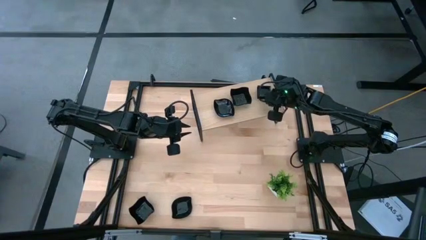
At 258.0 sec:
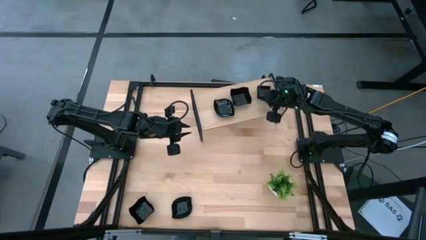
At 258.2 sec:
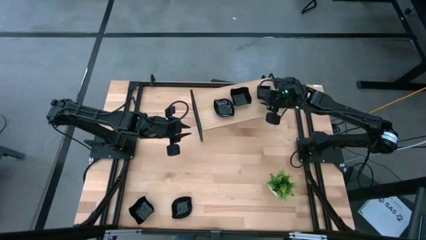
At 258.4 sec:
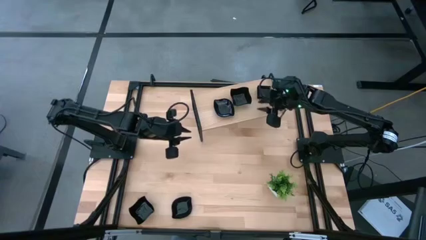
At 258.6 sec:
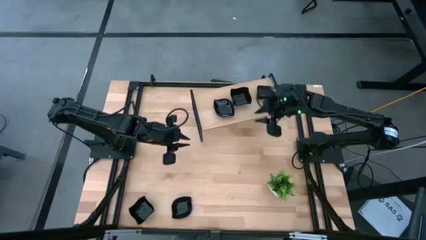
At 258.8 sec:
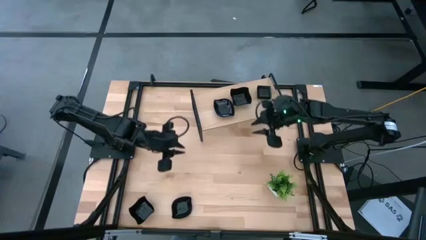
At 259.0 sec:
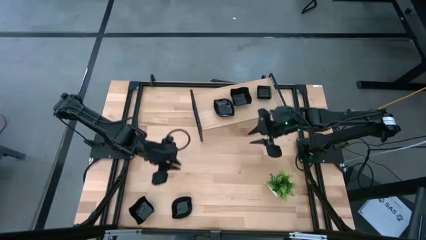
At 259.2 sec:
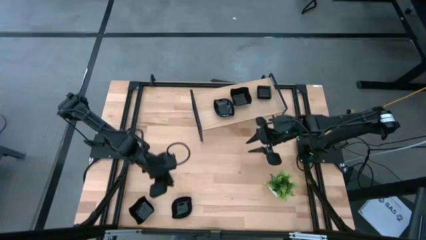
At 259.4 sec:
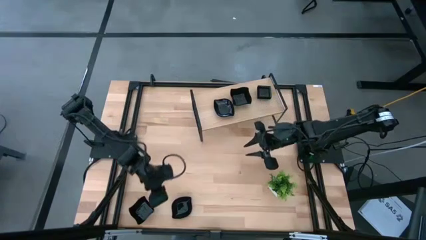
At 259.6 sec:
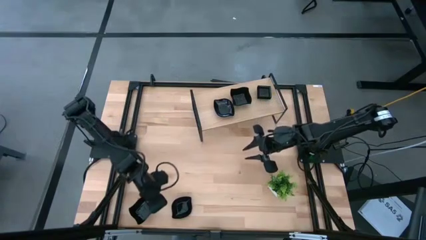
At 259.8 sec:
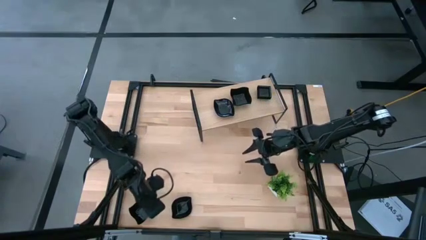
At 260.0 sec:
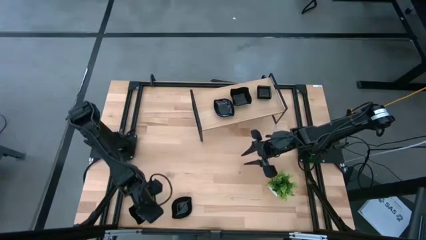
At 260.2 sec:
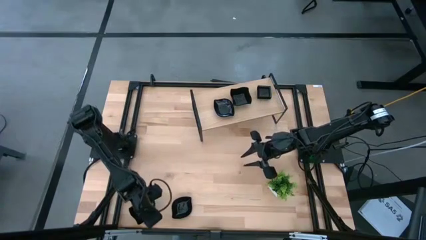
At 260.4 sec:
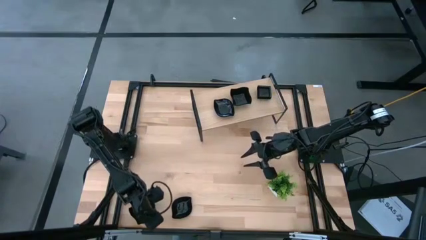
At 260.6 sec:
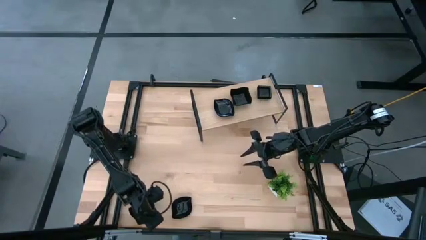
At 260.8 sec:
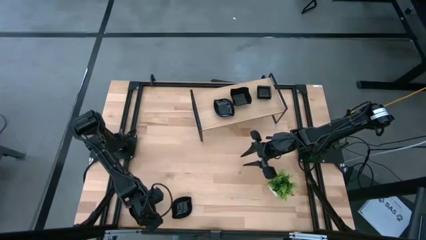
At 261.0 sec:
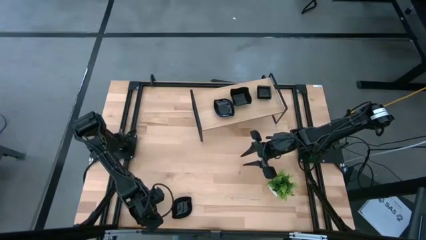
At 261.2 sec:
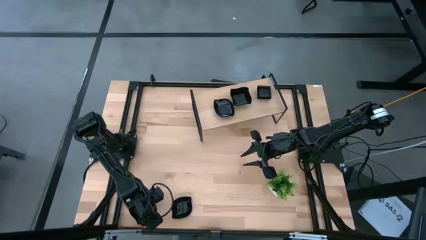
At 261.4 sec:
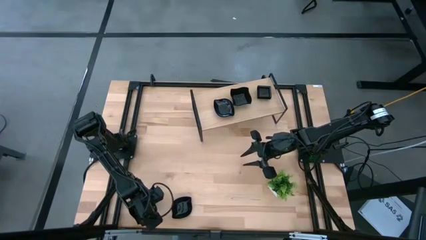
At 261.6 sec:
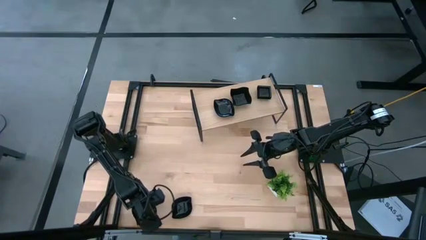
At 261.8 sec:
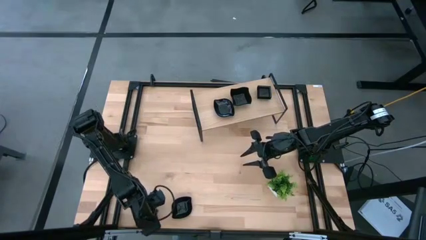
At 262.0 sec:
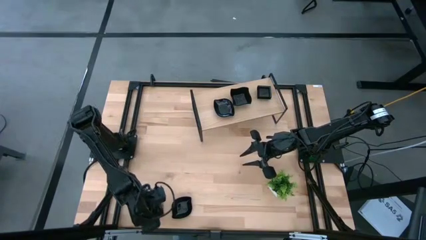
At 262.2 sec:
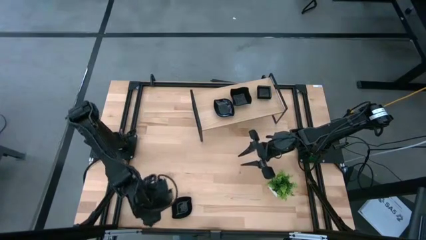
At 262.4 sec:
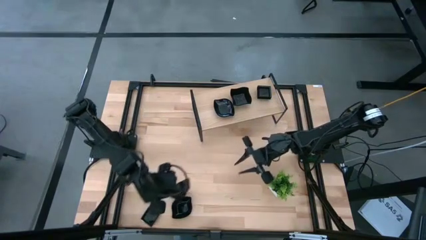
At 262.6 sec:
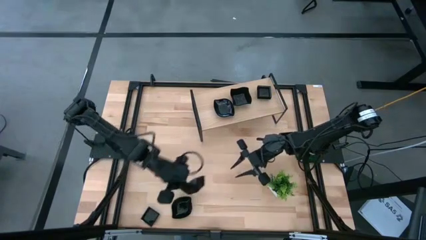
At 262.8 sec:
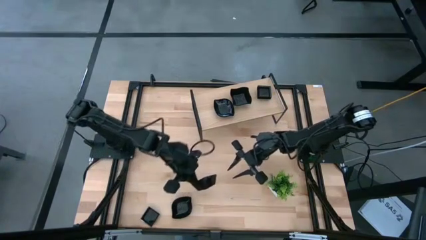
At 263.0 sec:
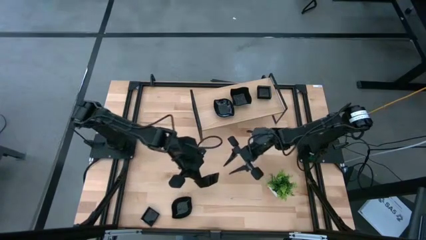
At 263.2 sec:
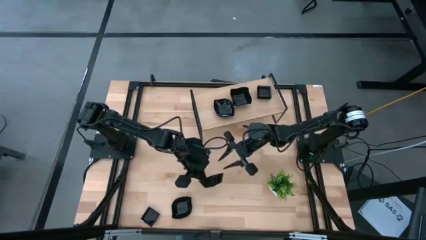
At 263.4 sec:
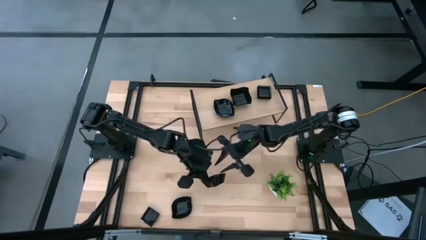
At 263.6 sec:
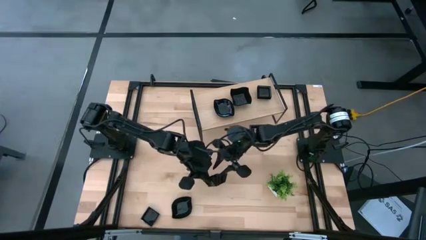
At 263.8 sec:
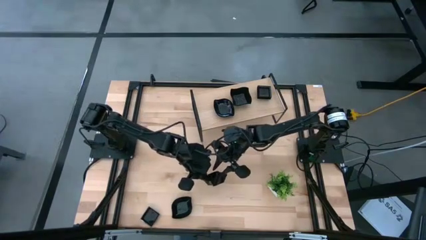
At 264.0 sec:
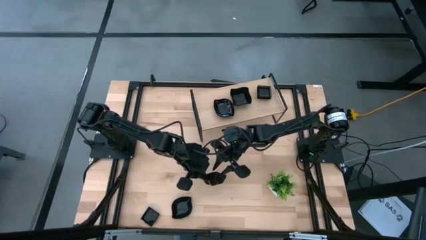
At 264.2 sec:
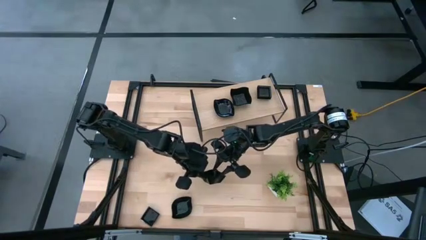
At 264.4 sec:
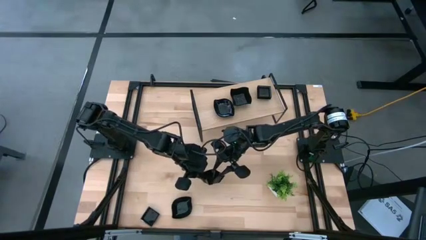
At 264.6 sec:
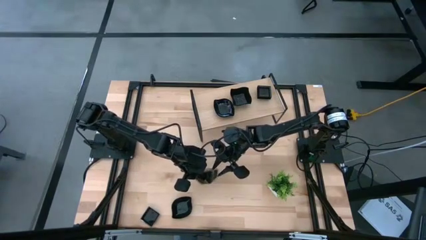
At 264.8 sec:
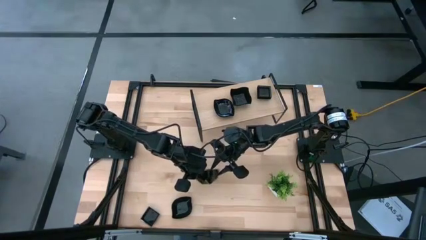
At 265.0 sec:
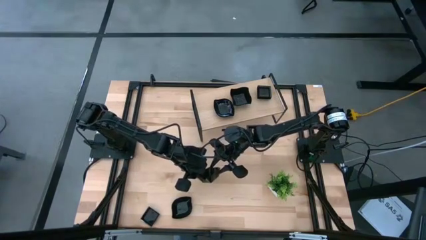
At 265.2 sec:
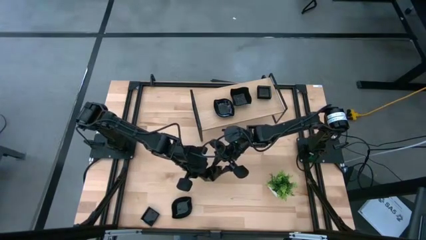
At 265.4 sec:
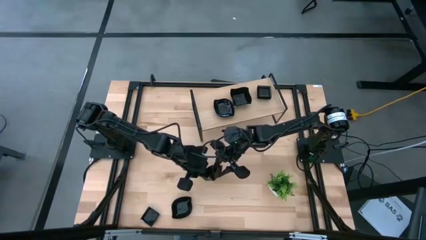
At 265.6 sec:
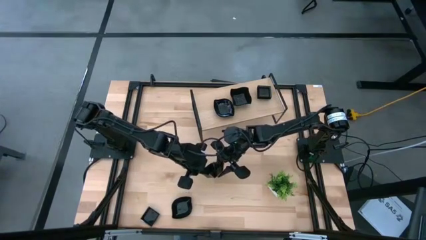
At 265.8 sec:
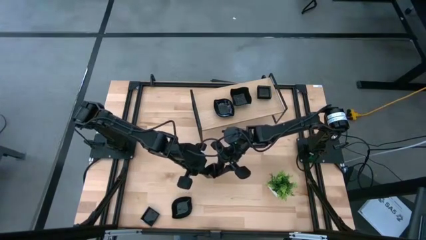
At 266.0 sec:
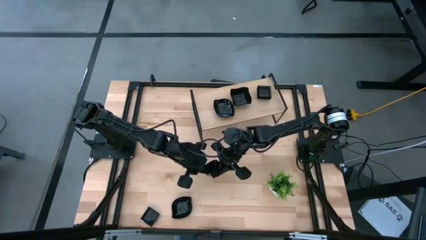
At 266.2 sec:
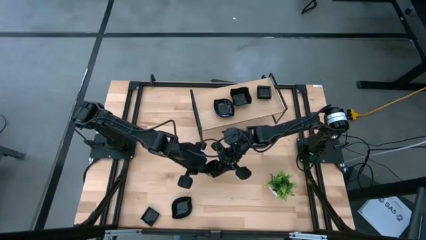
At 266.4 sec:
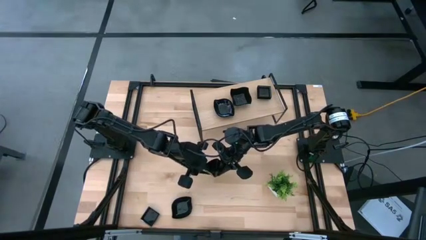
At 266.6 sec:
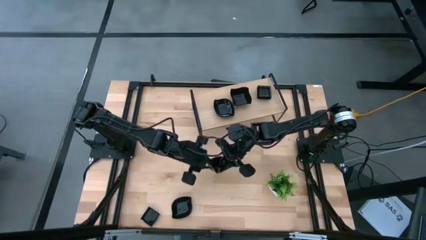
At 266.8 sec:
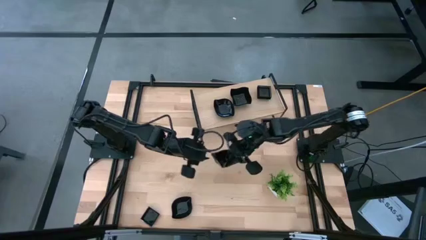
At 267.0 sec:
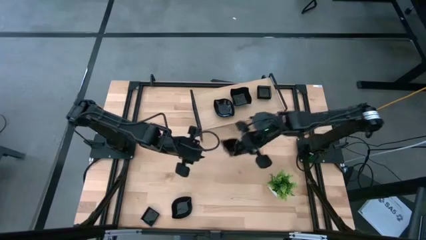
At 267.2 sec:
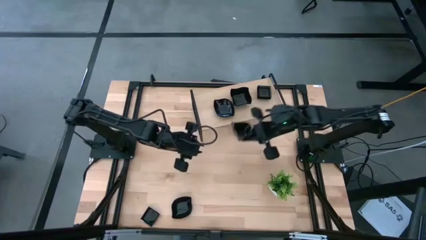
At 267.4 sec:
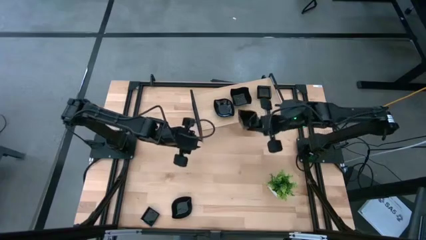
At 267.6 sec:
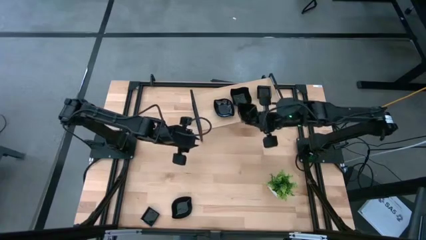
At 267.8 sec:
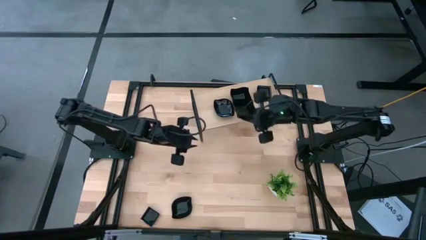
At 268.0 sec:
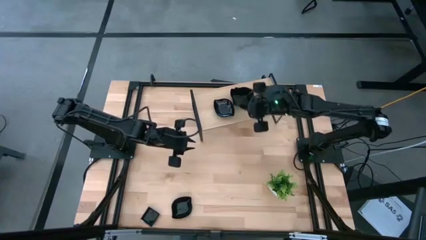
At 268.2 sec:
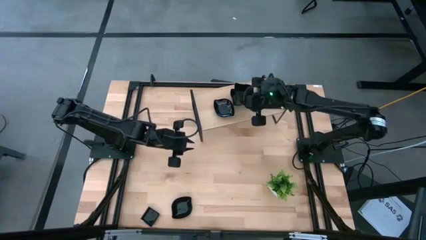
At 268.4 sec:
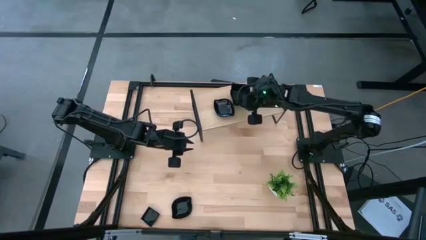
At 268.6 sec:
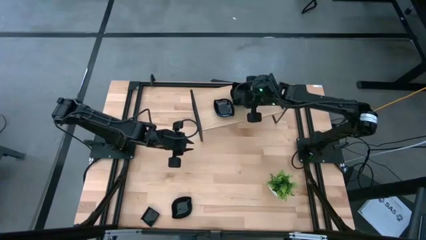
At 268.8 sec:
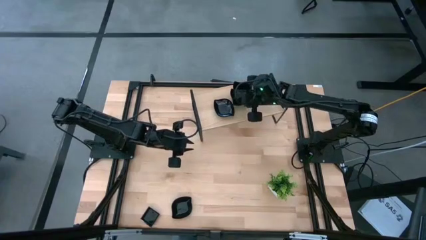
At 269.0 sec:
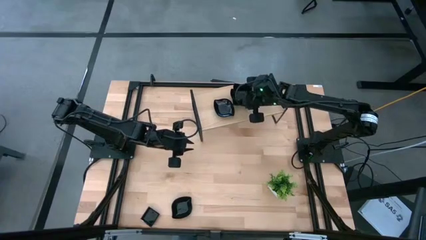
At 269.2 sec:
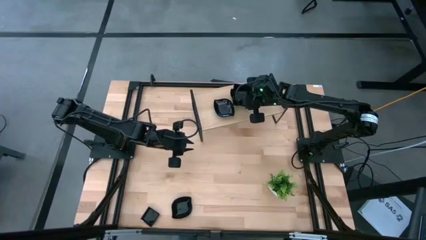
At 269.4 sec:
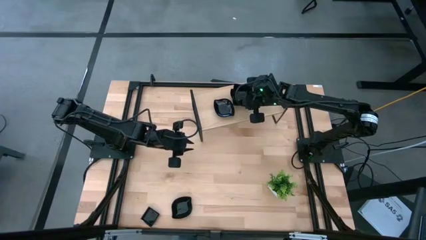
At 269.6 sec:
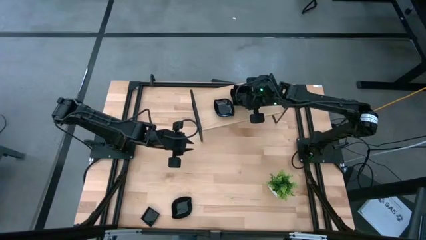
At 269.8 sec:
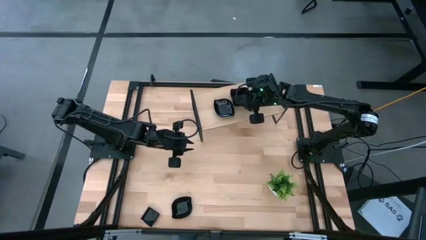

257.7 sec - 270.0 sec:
Task: Pick & Place Mini shaped plates
Stack the distorted square plate on top of the distorted square plate on the shelf
